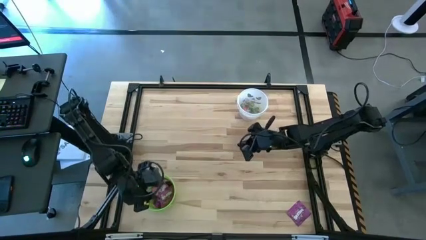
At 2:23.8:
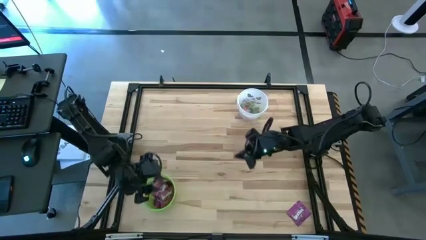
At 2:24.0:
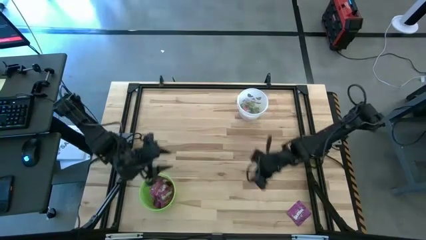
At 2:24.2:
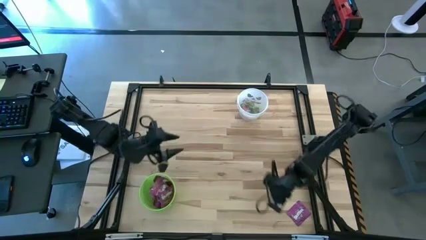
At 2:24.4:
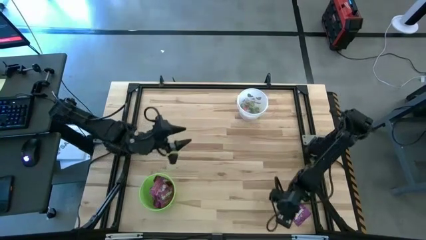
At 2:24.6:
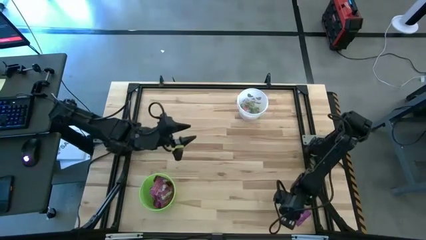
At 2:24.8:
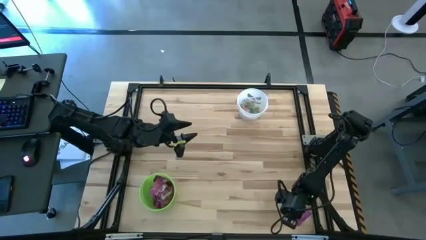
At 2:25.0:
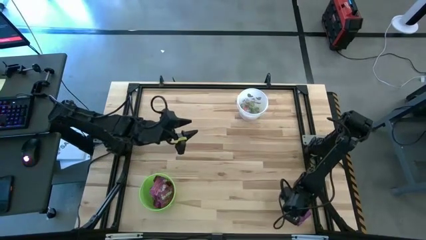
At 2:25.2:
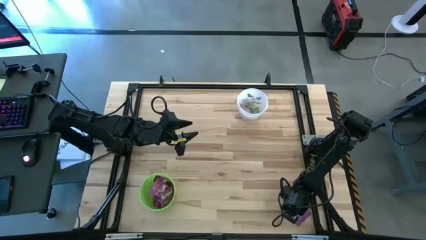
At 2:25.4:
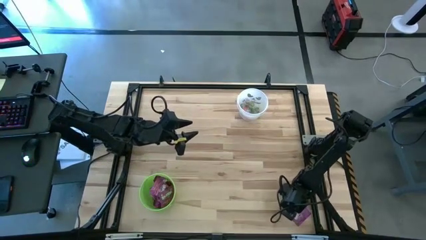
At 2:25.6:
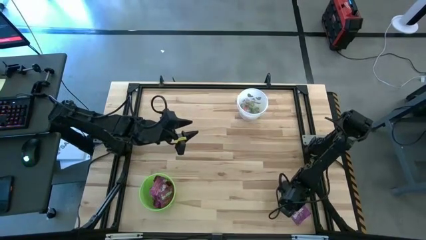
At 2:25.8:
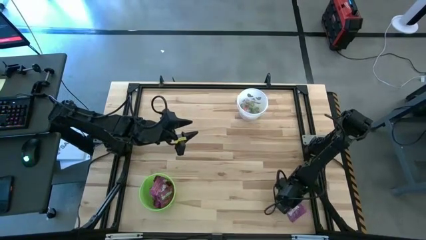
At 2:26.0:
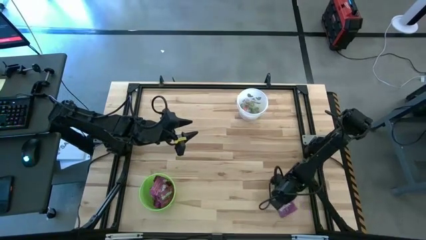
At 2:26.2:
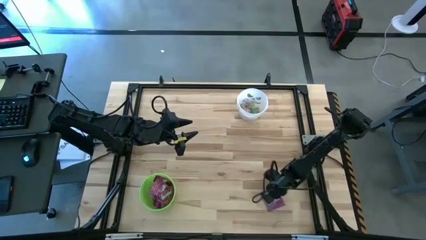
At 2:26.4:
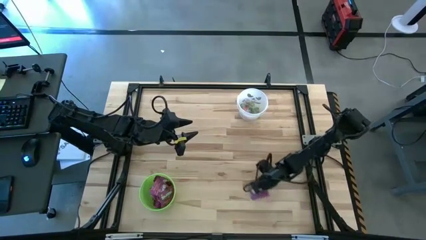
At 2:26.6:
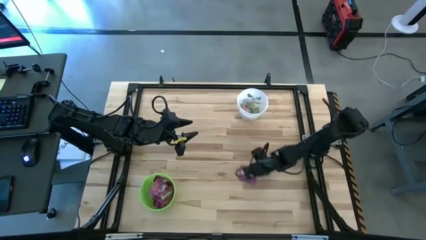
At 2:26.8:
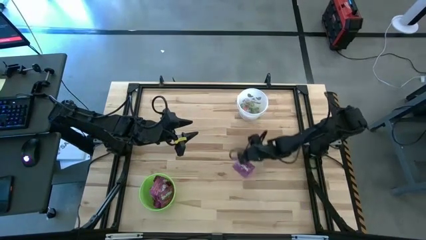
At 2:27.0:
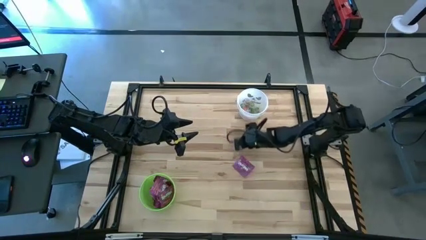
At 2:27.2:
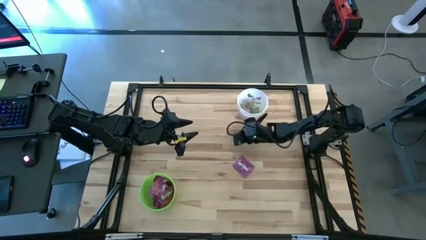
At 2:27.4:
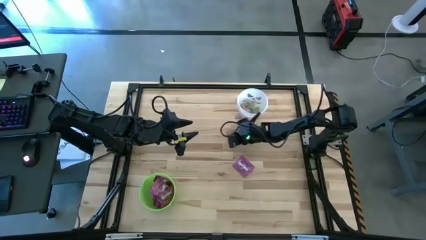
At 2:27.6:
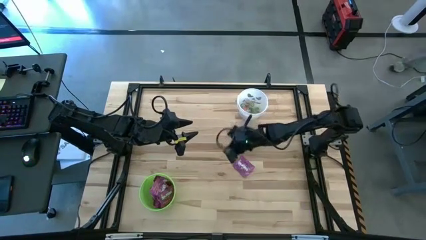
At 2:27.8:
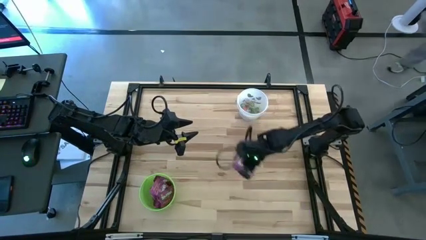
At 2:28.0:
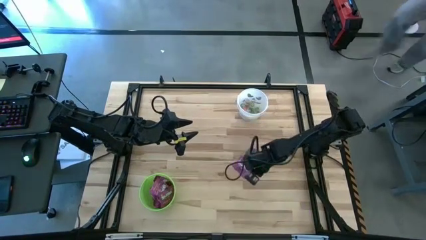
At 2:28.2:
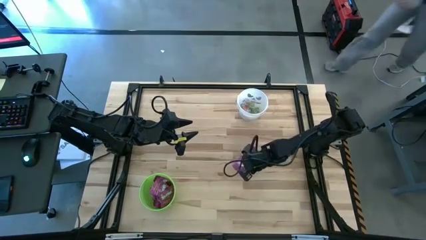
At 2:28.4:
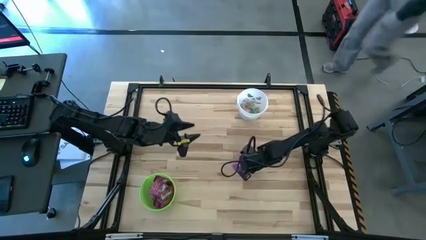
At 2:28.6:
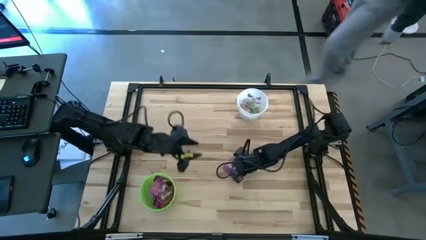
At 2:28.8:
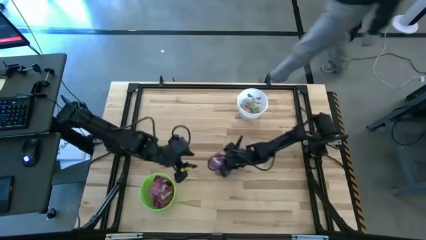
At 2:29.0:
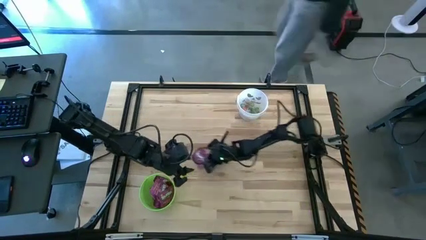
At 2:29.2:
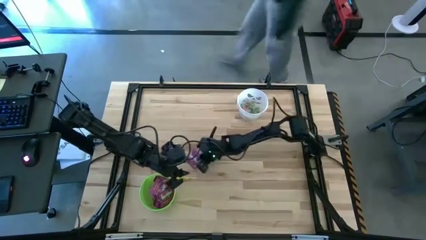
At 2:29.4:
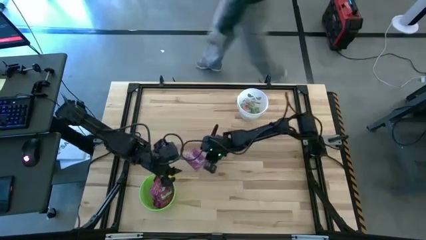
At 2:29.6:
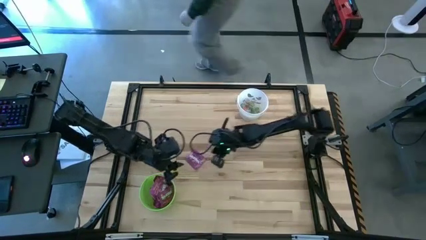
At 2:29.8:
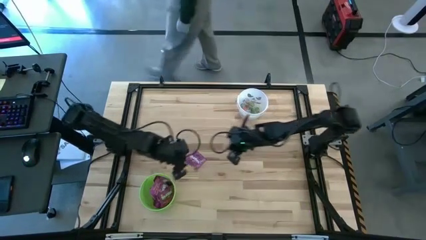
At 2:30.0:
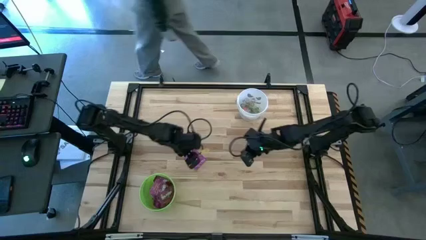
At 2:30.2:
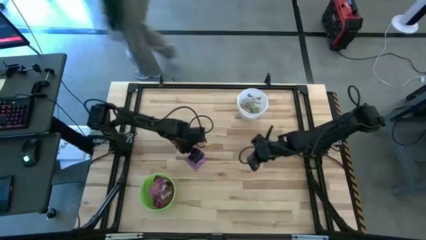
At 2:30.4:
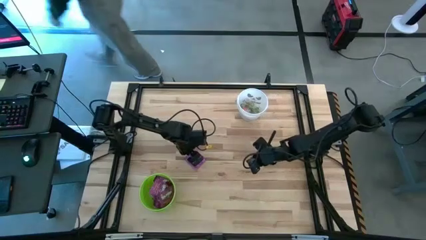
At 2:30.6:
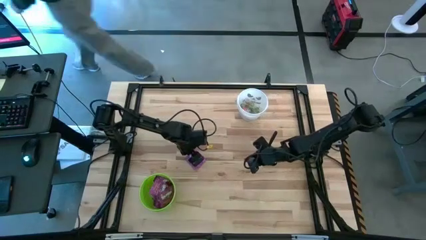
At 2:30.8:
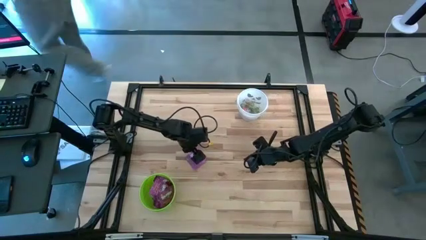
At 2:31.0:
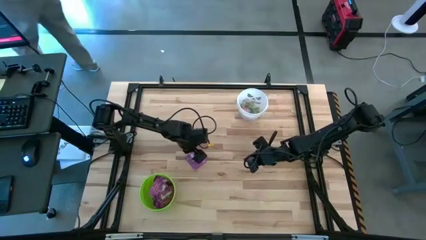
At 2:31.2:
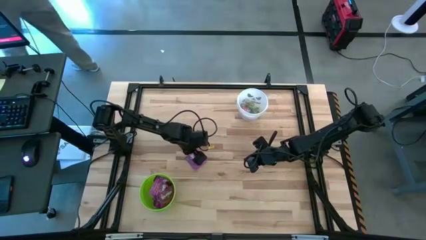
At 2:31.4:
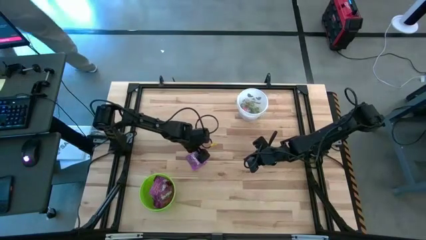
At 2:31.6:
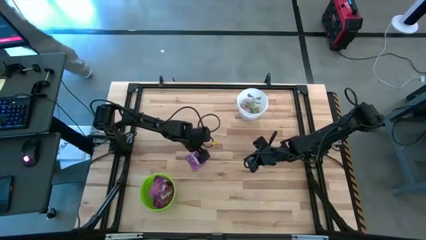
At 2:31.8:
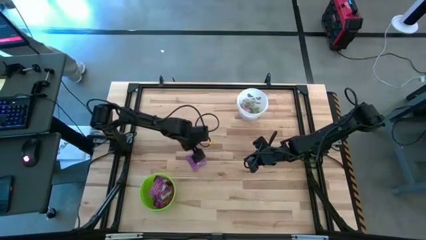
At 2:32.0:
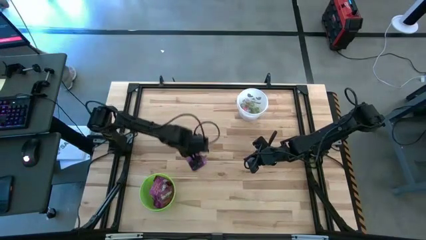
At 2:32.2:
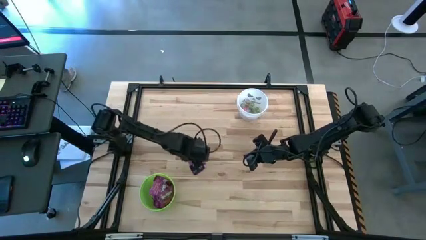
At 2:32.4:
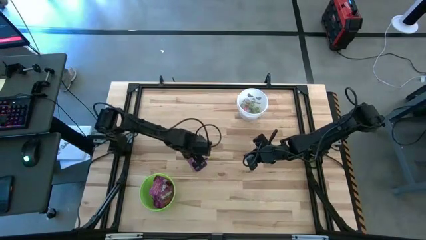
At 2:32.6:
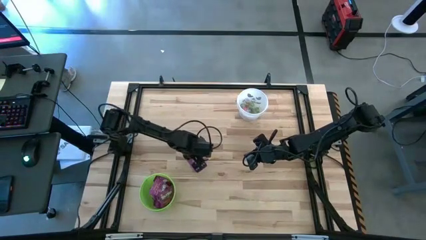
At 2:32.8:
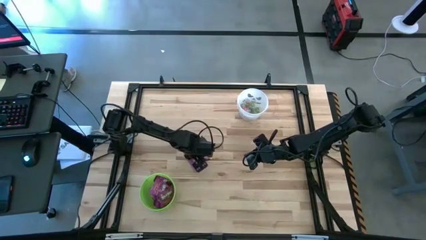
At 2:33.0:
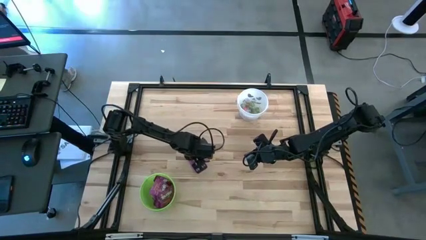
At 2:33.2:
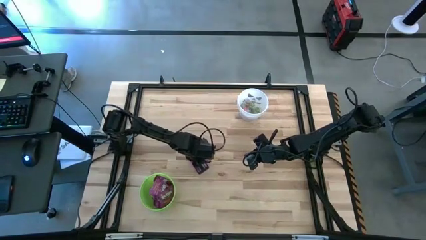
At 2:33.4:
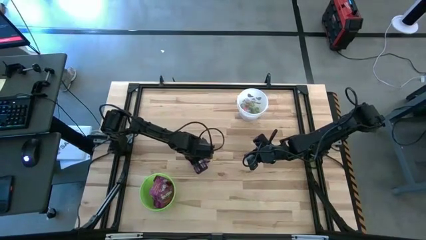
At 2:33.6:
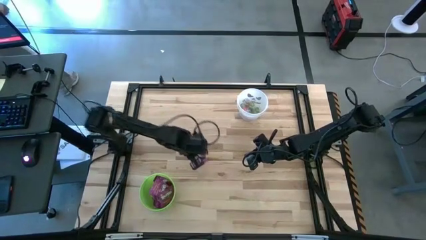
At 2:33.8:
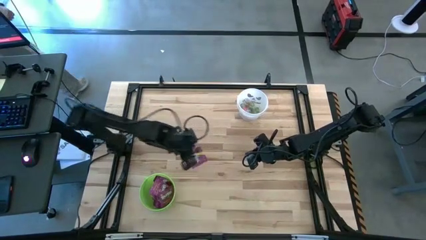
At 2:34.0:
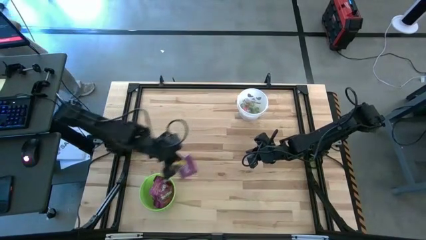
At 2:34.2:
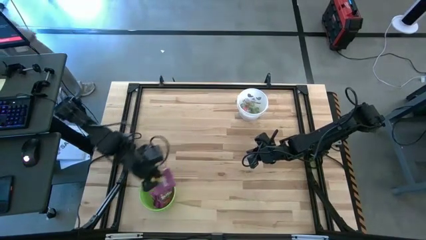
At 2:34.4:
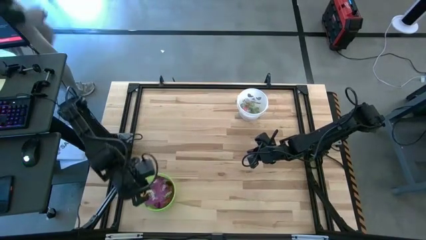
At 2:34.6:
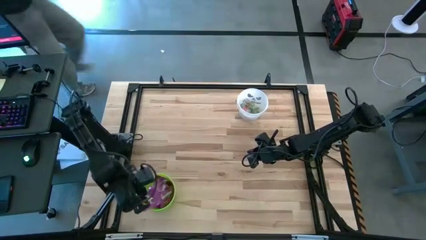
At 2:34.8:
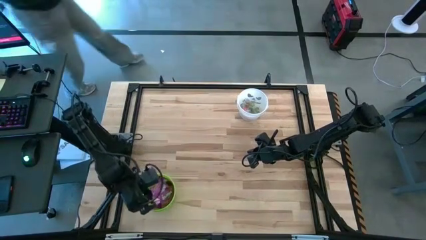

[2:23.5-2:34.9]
Task: Sort candy by brand, put in halloween buckets
Put the purple candy into the green bucket
